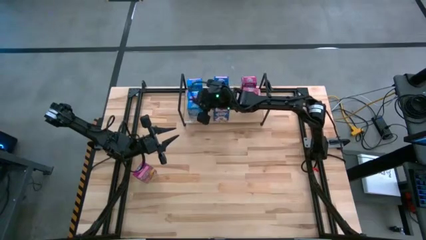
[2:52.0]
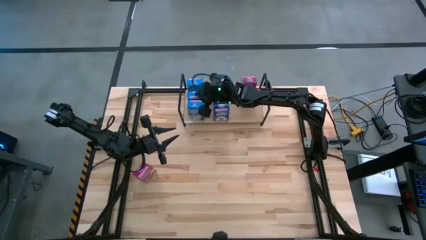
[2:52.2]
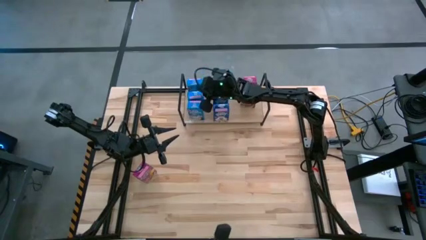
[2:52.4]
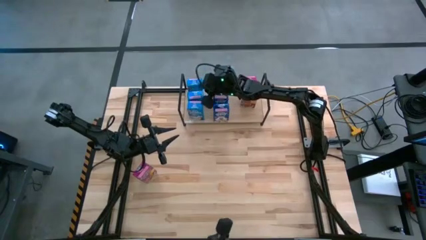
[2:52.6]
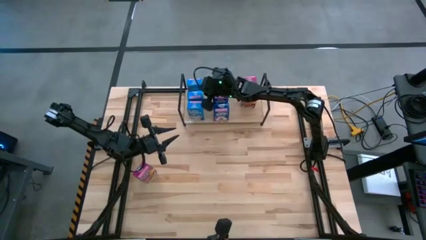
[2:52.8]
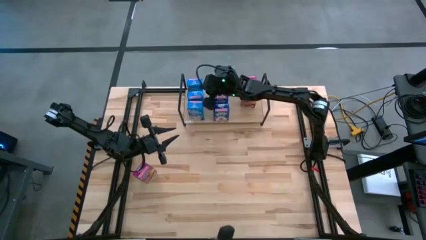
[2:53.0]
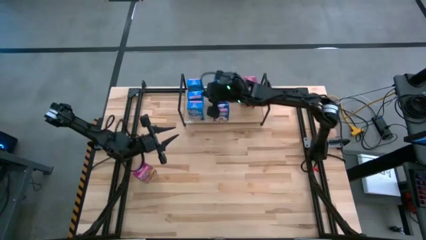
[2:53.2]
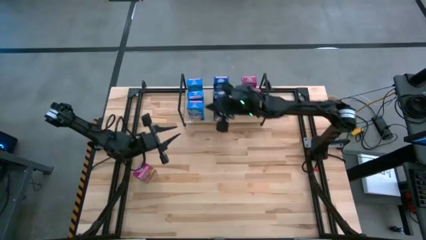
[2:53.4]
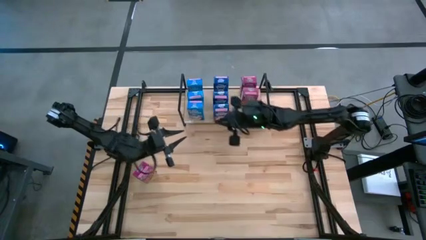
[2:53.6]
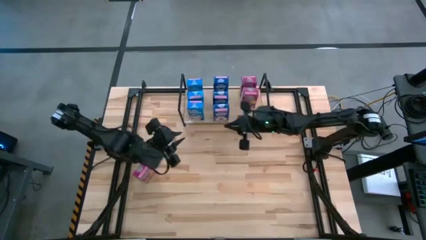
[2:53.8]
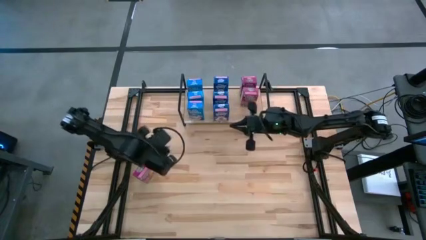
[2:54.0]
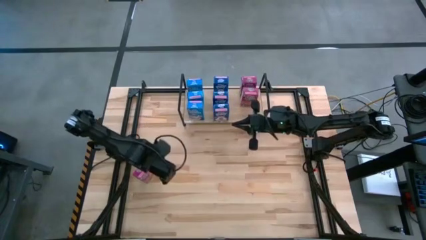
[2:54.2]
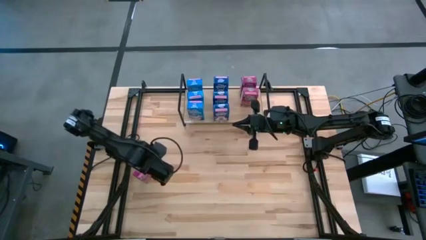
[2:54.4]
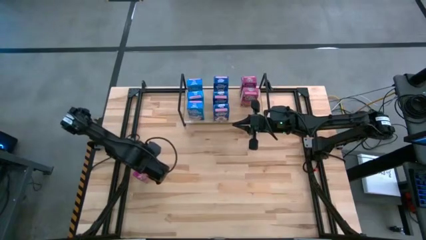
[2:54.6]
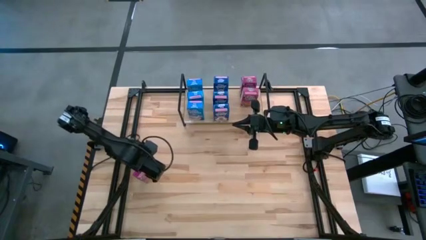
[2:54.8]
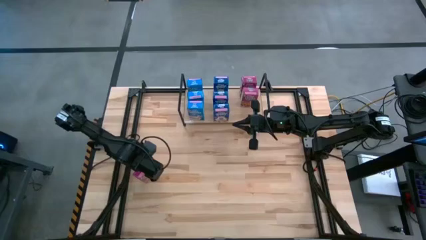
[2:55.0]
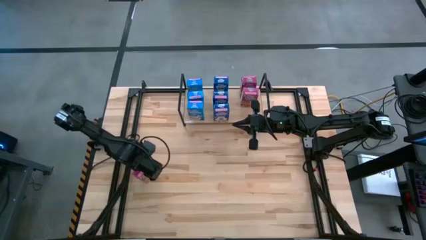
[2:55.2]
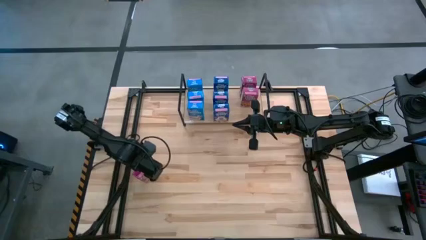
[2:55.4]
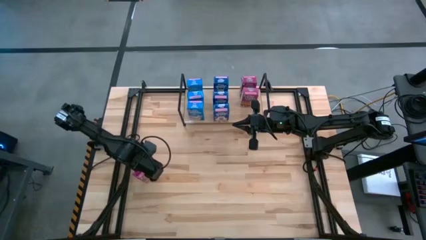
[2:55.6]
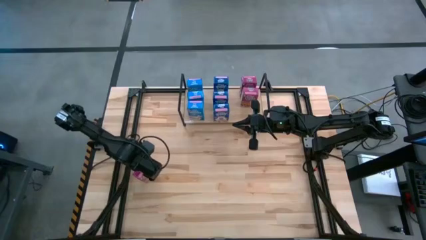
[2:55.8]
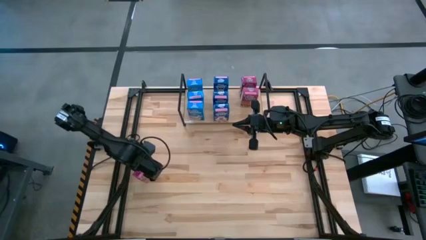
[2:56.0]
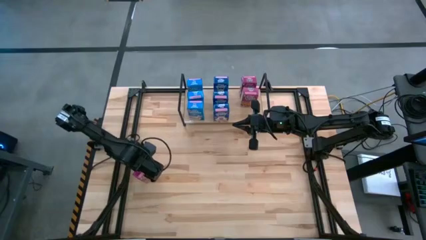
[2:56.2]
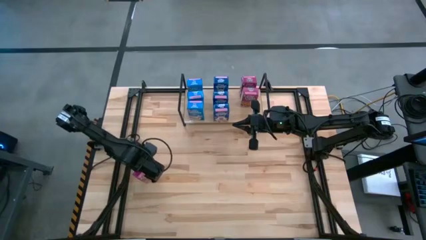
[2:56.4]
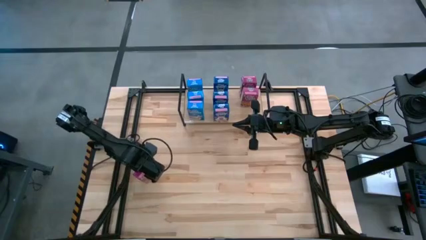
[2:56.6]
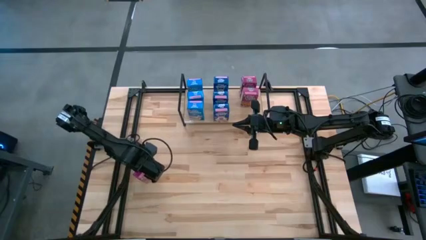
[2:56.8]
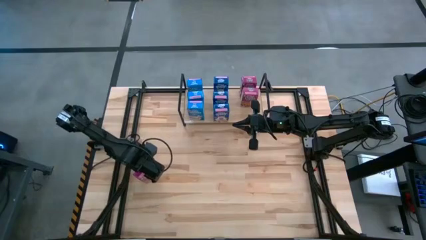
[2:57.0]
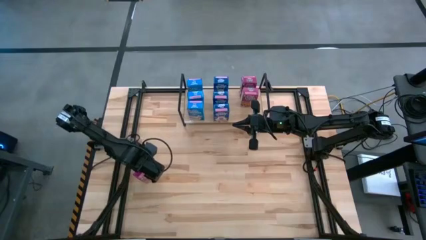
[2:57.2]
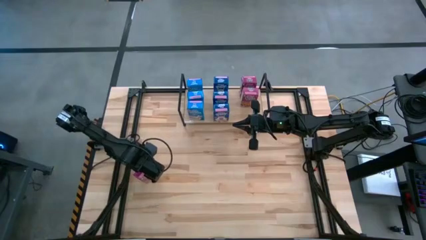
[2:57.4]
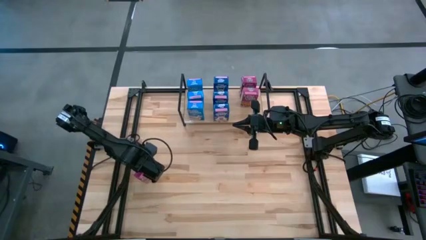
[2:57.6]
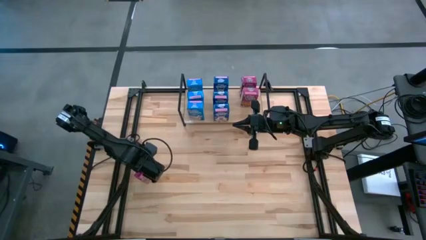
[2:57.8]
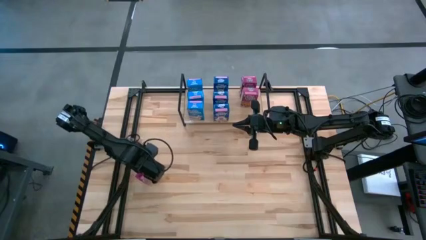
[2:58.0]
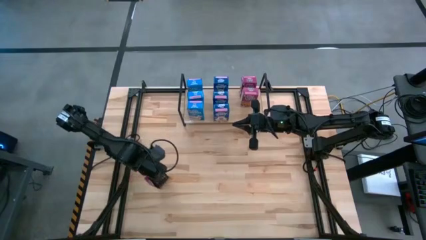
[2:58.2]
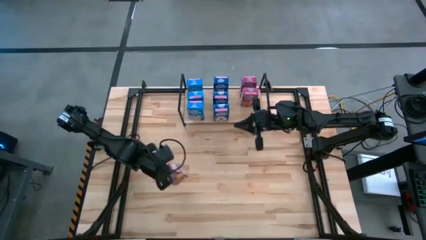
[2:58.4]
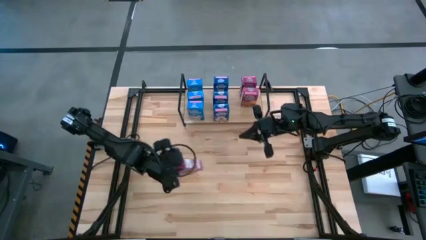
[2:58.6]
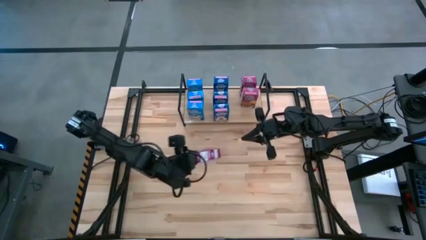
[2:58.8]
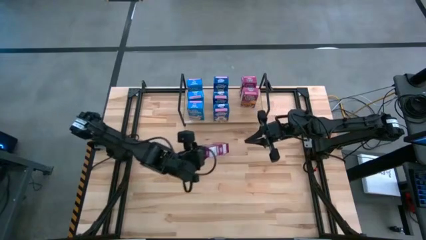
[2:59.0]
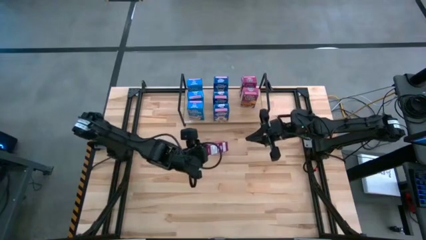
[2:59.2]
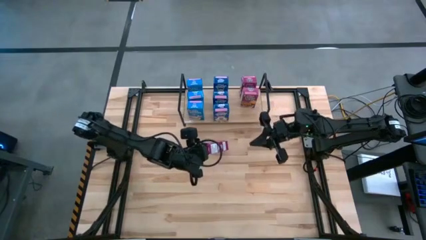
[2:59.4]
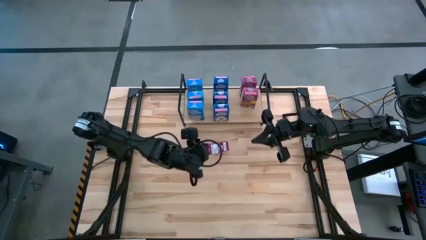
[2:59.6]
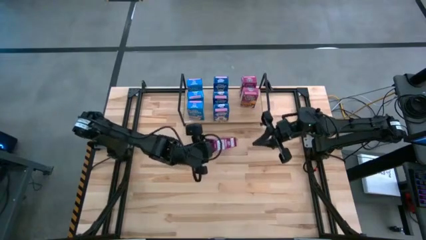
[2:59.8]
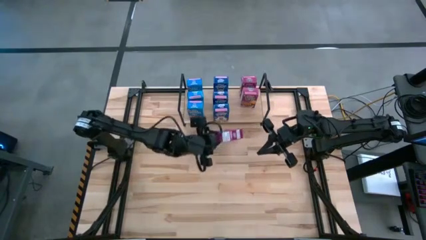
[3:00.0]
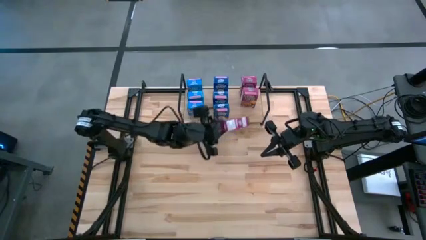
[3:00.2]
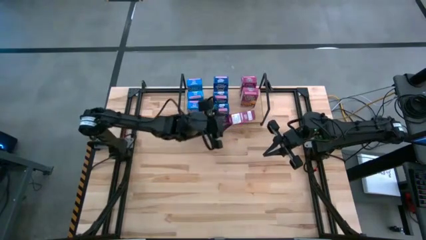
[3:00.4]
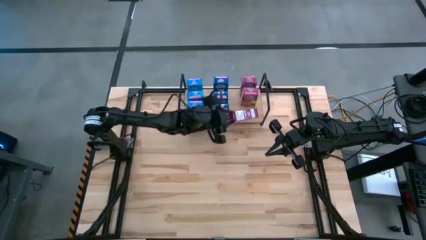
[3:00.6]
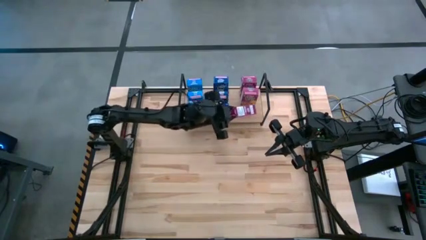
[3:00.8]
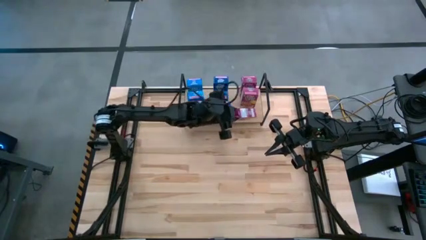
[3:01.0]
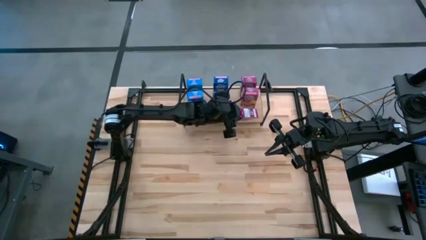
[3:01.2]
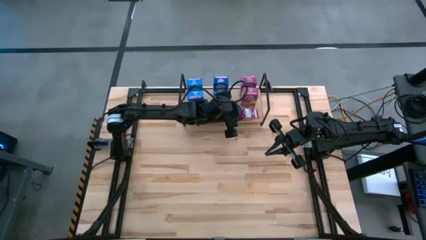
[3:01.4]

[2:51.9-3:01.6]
Task: Stack cereal on shelf
Put the purple cereal box on the shelf aligned with the other purple cereal box

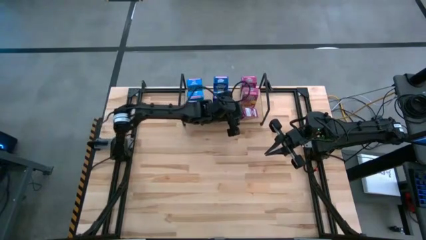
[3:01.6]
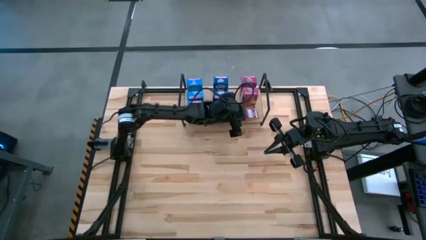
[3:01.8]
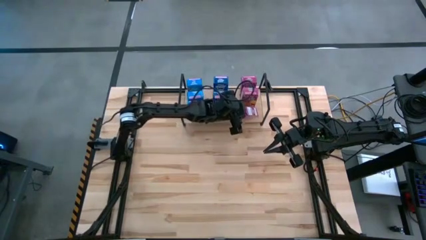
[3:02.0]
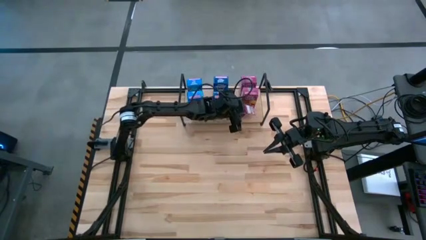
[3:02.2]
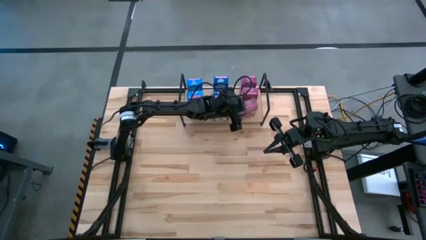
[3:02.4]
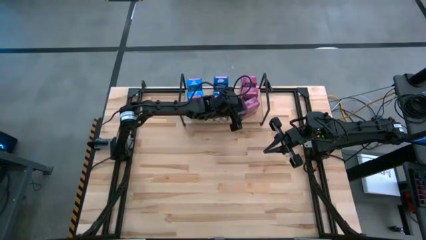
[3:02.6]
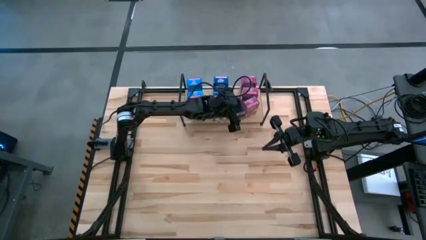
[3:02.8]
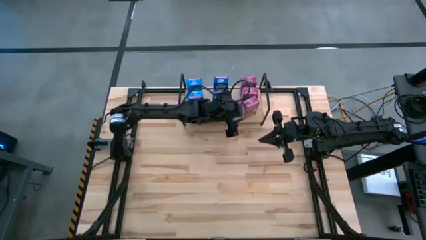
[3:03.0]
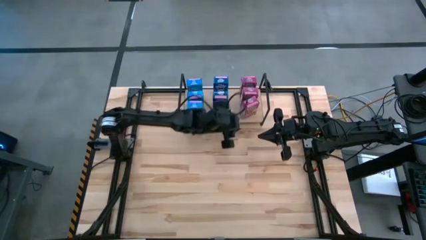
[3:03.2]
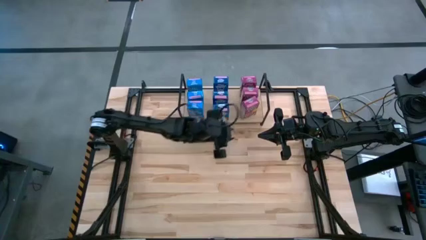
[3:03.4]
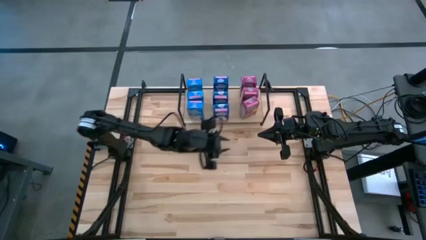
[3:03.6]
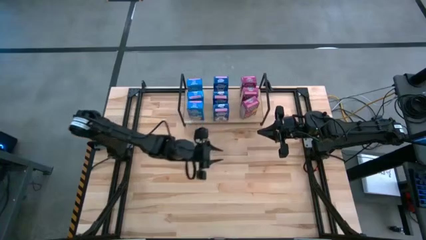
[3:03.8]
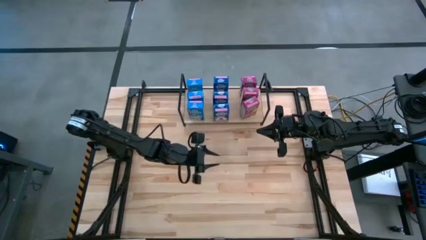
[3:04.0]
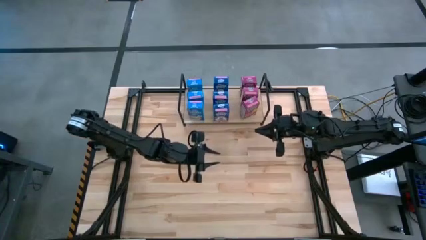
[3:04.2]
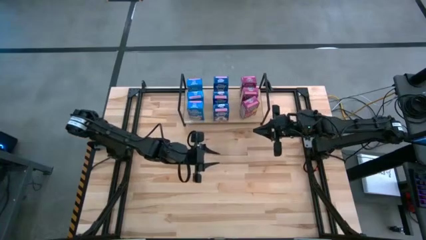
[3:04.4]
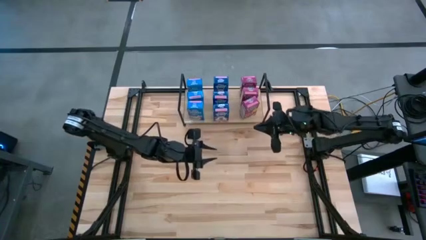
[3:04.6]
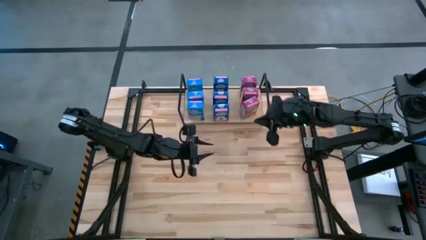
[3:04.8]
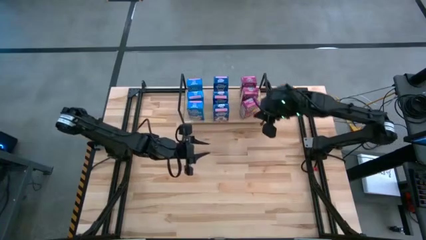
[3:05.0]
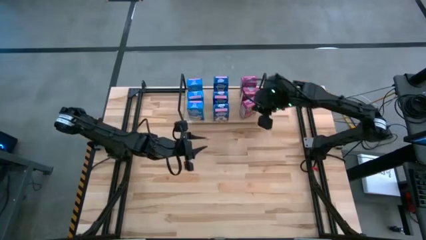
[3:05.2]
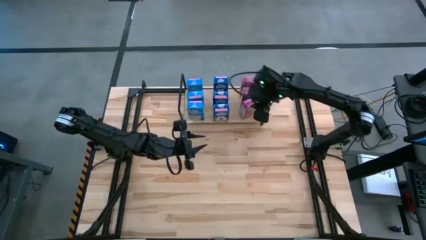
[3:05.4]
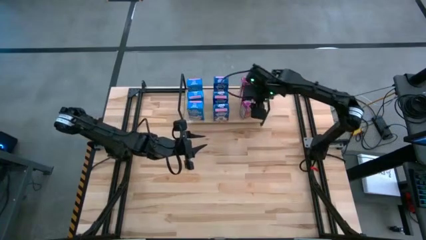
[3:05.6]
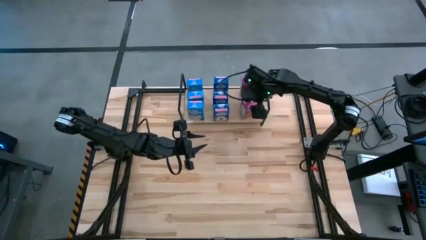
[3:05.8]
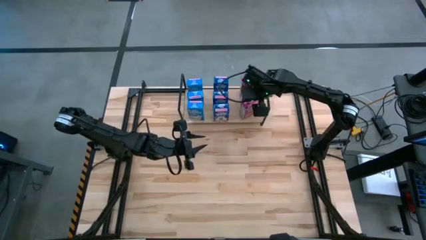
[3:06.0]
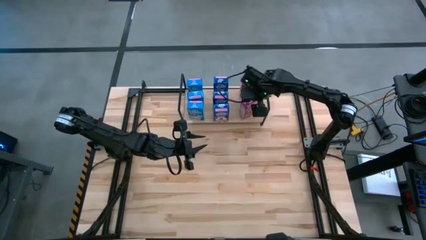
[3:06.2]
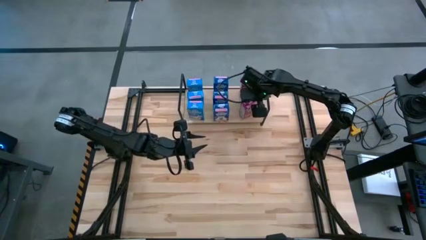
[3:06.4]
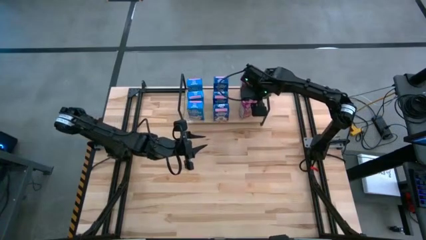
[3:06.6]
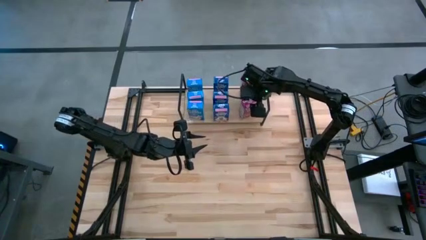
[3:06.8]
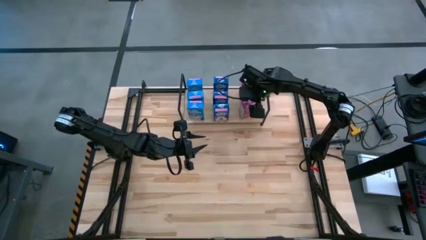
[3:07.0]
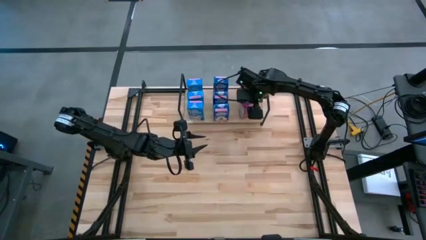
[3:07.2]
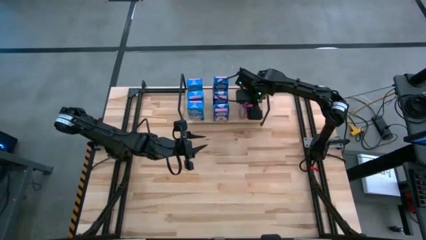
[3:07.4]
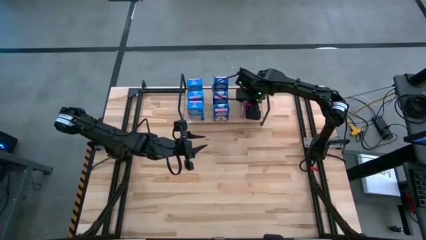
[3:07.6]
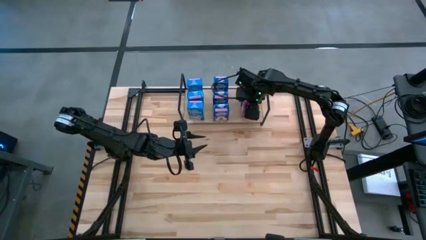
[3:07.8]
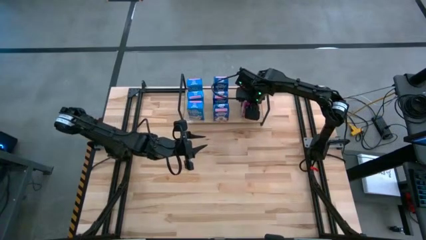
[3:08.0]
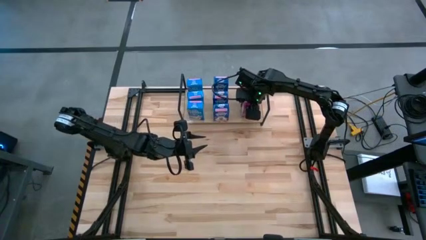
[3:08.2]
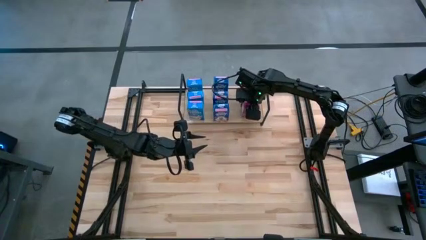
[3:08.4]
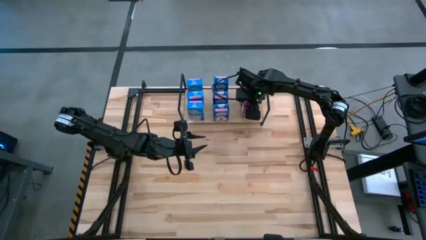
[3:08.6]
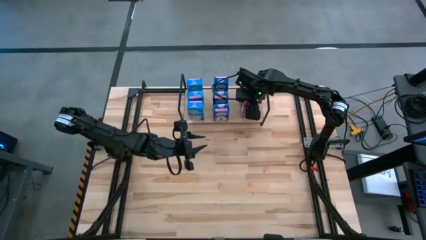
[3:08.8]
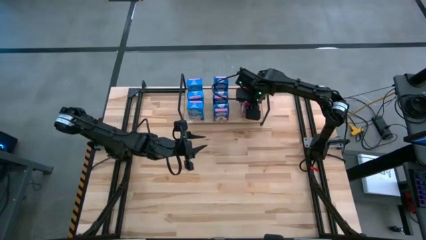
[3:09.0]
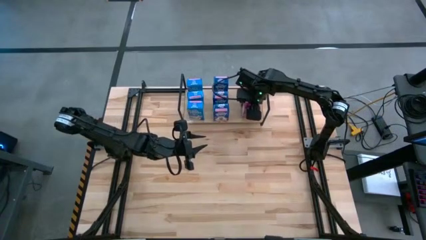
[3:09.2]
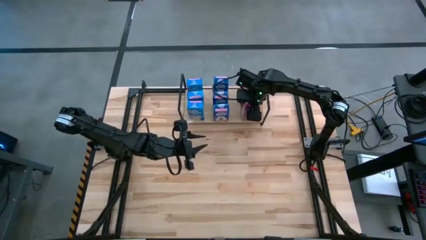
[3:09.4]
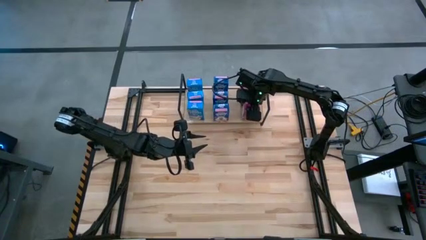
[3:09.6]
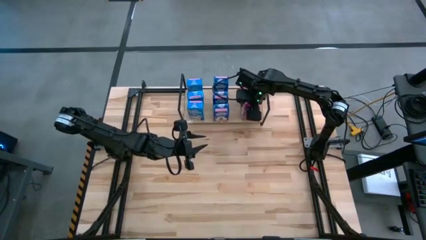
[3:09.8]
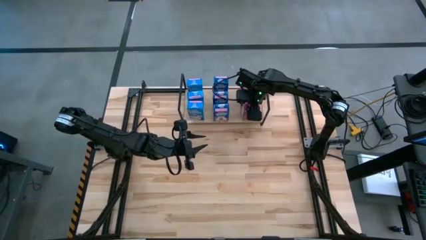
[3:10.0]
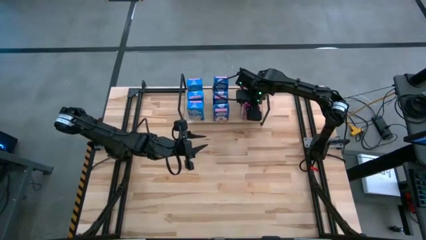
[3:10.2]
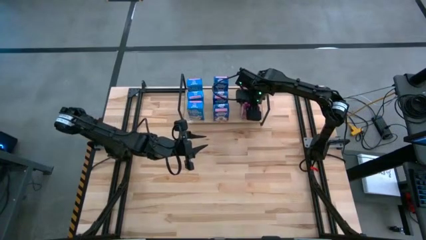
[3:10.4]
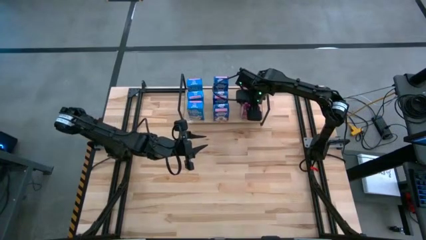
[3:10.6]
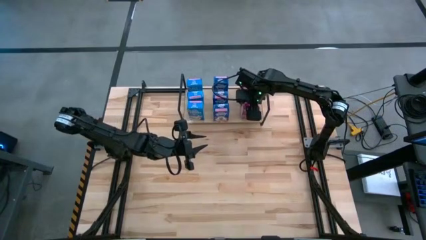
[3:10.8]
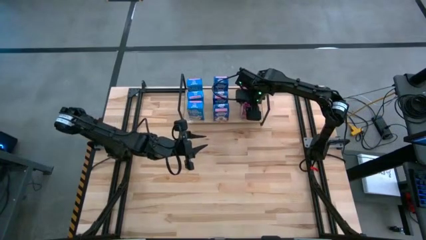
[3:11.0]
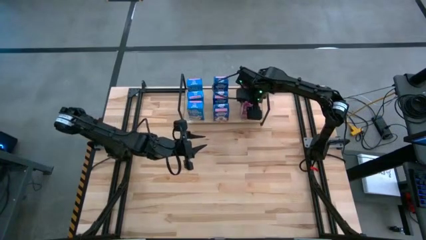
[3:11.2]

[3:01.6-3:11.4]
Put the purple cereal box on the shelf aligned with the other purple cereal box
